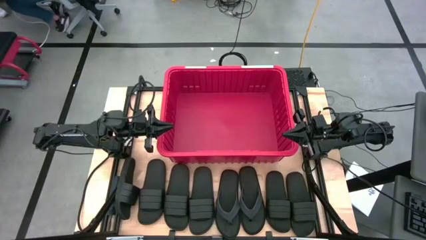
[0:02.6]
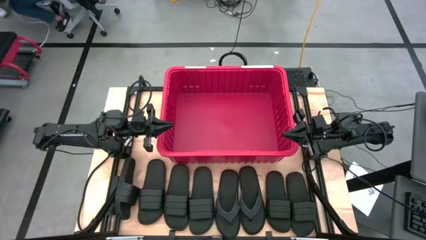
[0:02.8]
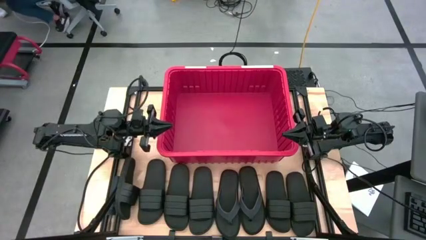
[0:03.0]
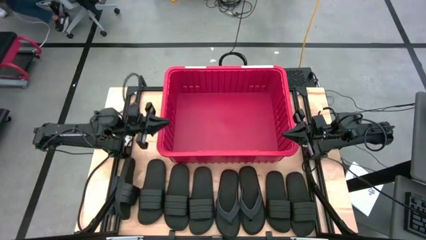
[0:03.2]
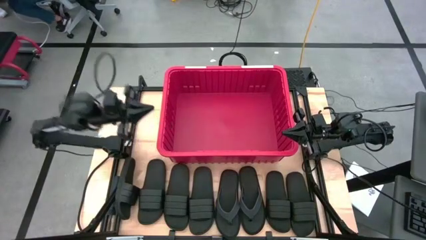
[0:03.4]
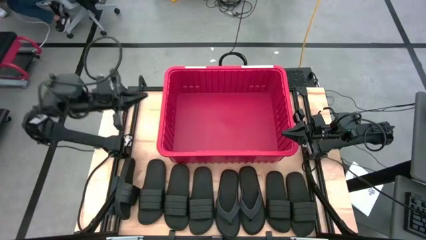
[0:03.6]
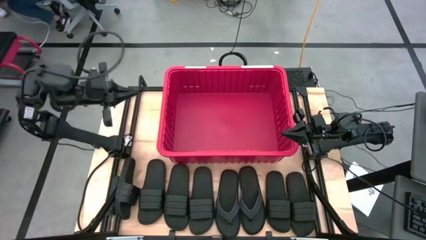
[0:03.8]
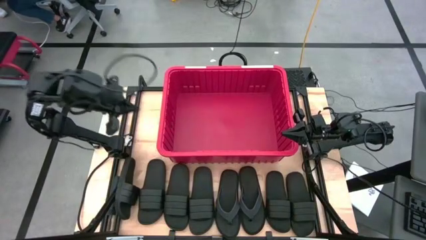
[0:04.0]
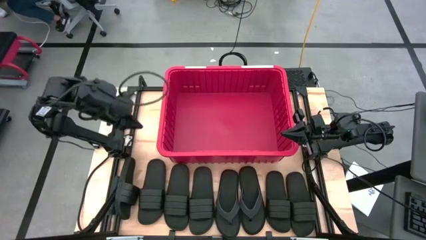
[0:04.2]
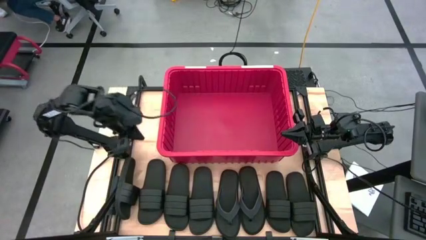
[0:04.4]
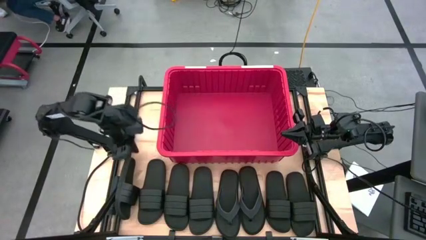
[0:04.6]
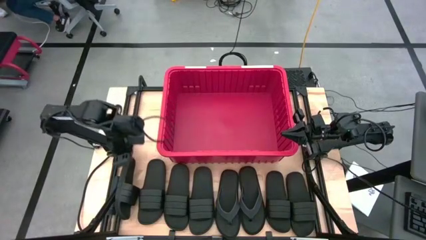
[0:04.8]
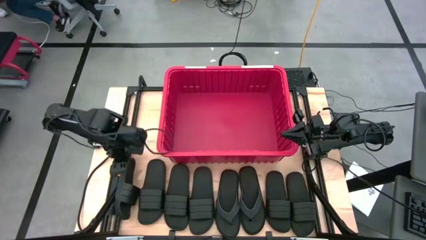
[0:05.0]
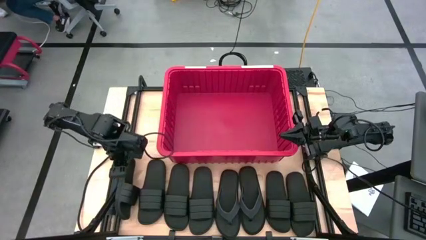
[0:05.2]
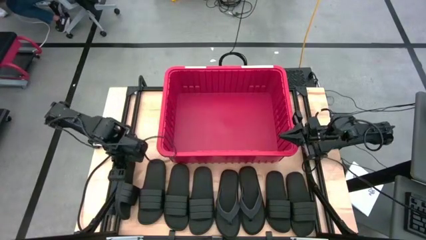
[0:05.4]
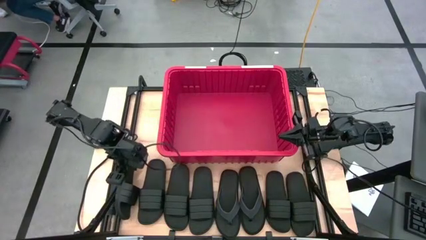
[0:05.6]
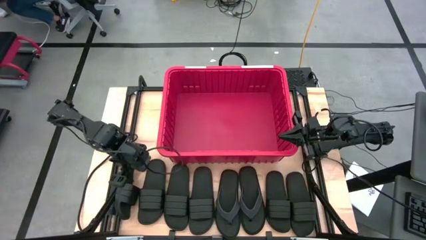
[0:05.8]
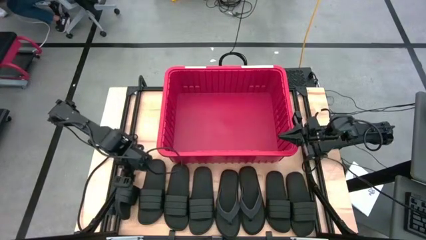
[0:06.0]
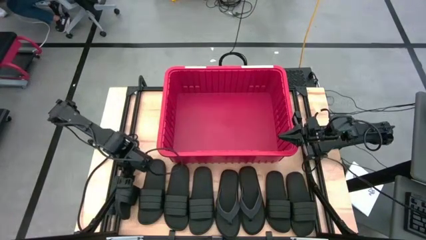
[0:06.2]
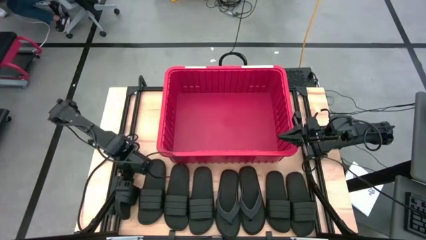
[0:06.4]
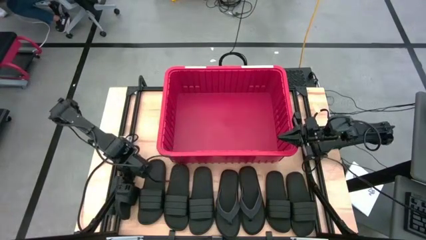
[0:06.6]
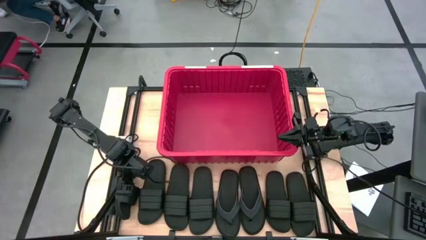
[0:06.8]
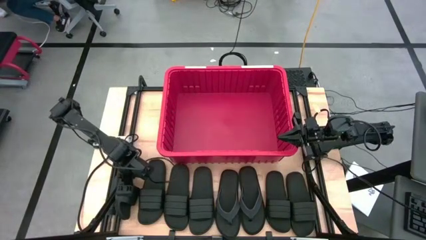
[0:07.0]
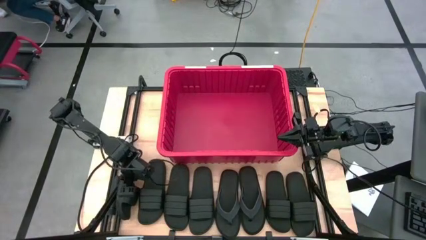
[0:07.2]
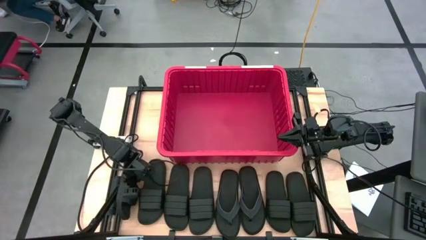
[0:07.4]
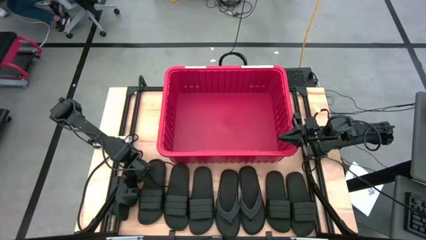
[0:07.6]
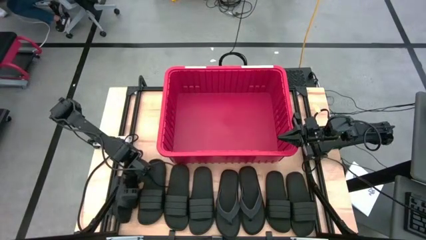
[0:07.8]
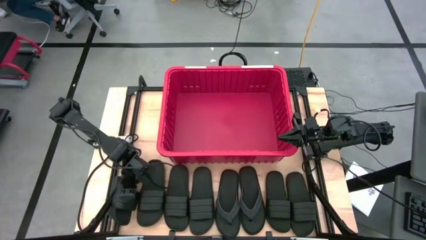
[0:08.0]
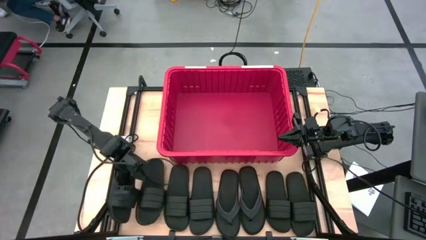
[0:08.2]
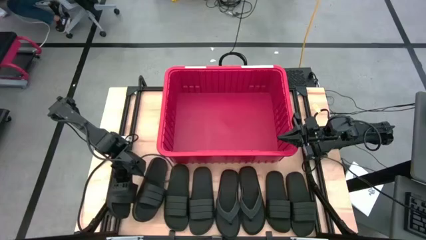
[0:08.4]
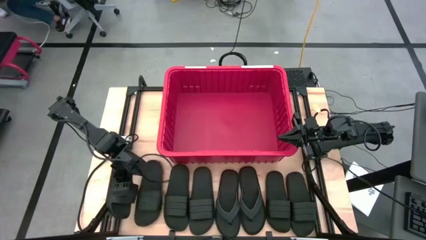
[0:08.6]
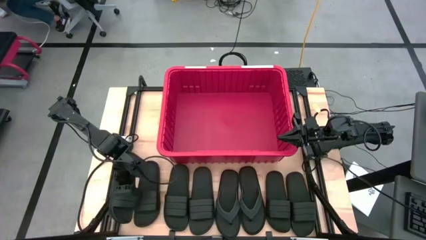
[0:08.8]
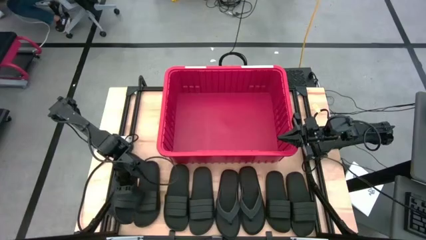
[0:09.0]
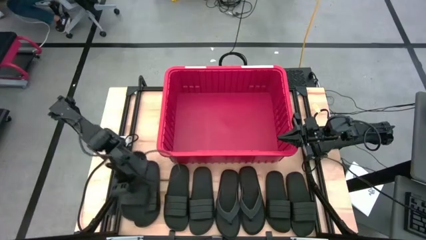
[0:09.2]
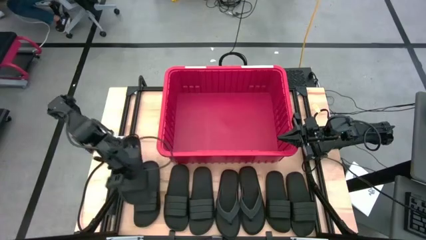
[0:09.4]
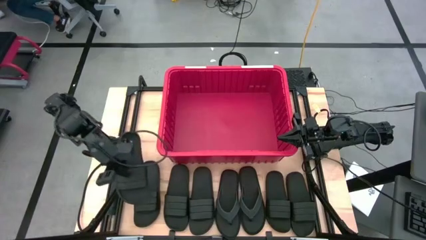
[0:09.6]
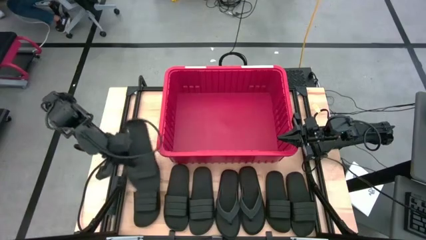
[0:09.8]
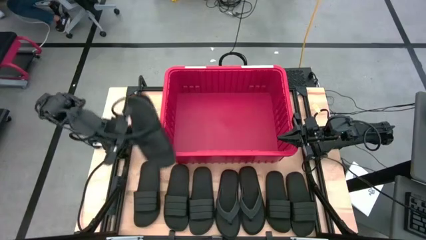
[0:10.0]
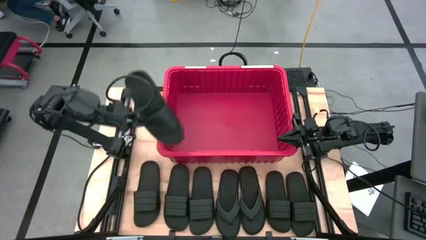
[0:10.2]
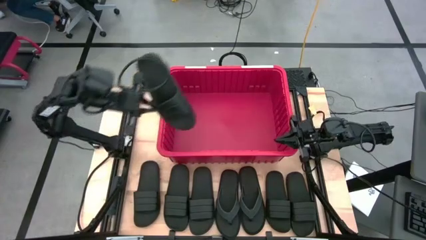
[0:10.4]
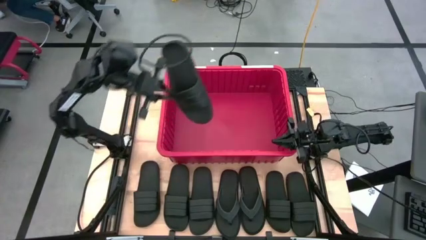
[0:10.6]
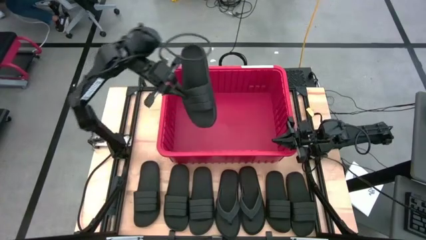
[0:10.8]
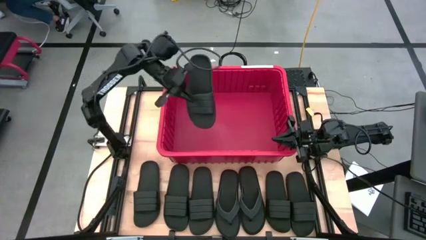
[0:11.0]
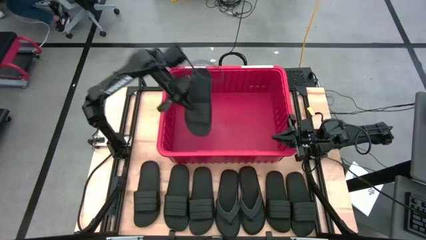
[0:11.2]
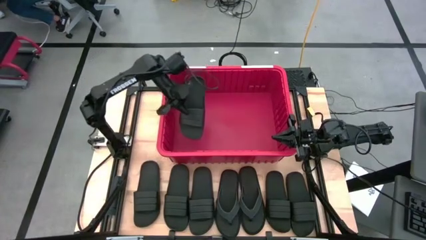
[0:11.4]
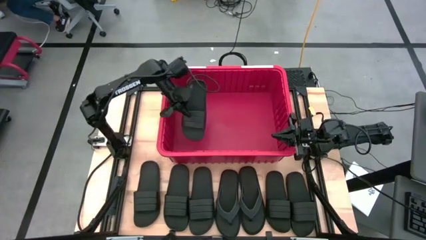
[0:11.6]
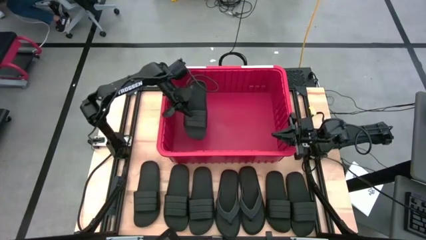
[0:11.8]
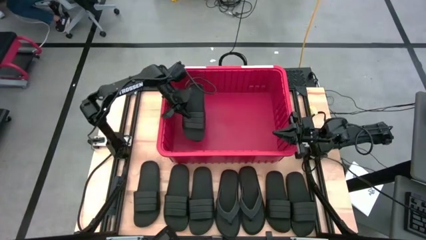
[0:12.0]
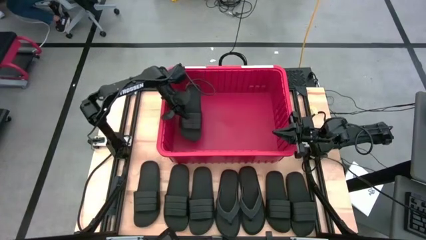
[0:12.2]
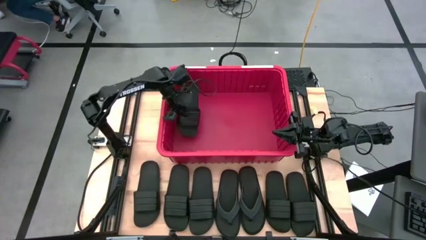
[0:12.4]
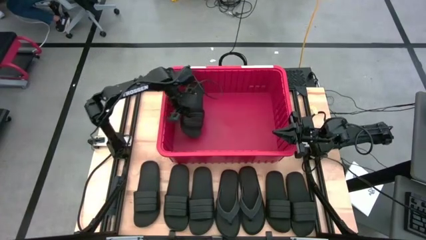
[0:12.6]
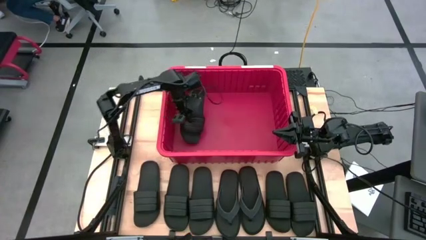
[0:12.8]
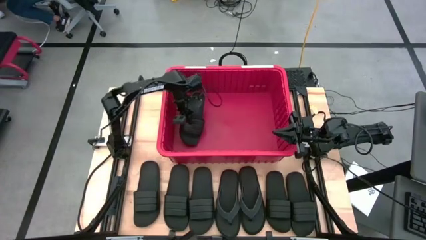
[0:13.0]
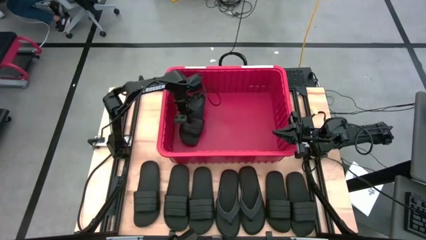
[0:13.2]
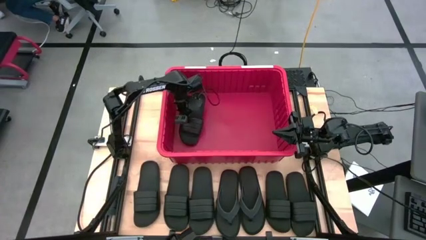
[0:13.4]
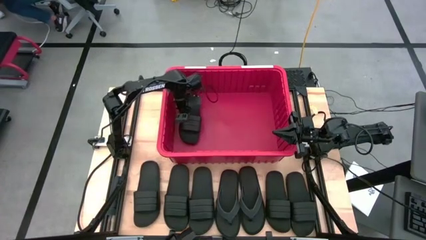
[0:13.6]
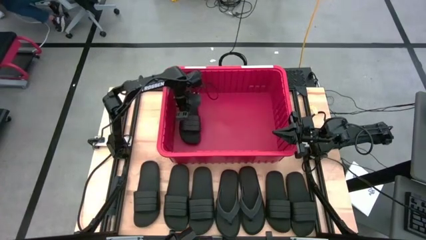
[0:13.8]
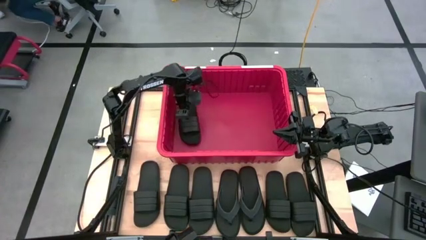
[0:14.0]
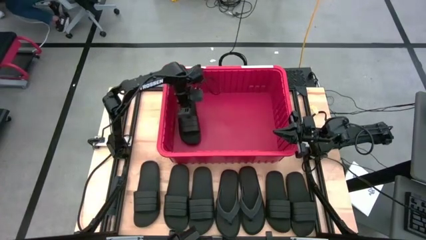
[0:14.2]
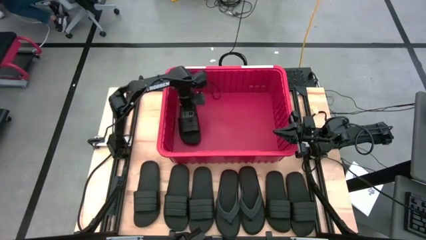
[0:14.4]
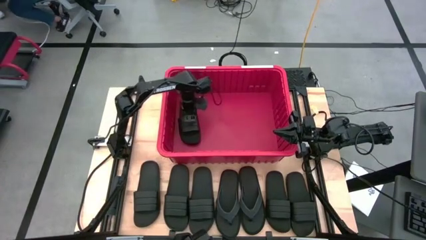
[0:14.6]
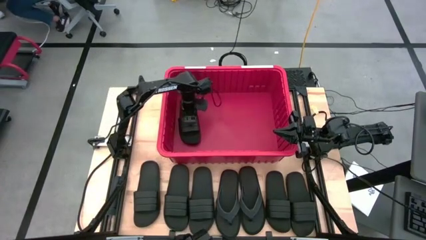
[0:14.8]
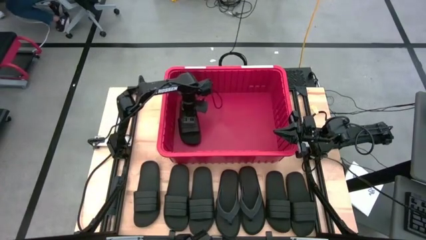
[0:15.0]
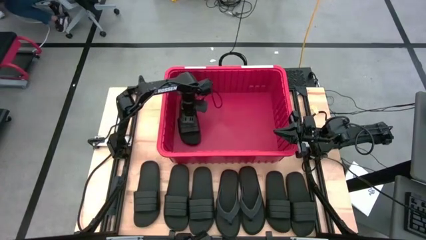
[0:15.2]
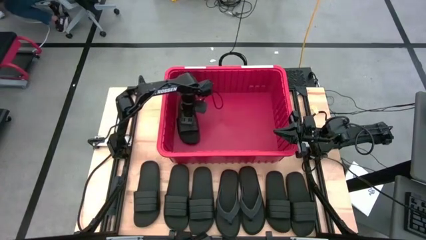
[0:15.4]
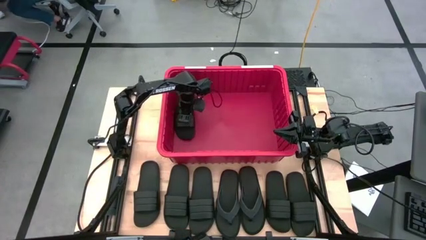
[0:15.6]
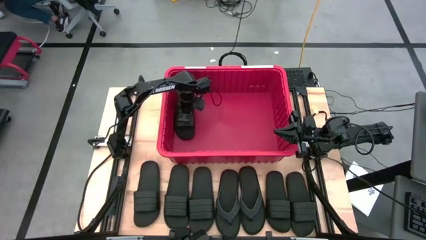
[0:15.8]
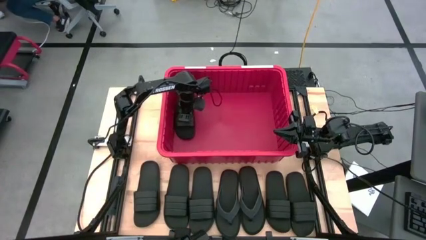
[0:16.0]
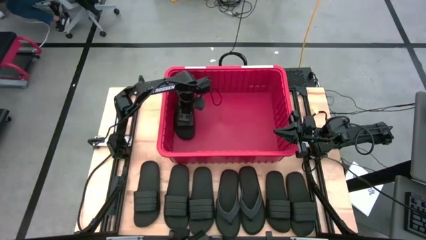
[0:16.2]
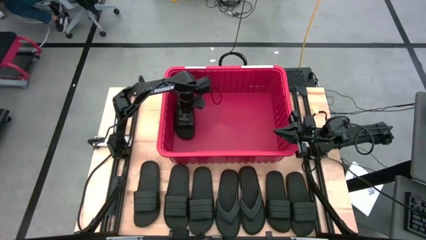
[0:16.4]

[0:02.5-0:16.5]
Task: Pick and place slides into bin
Put the black slides into the red bin
